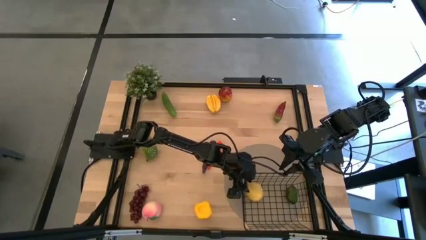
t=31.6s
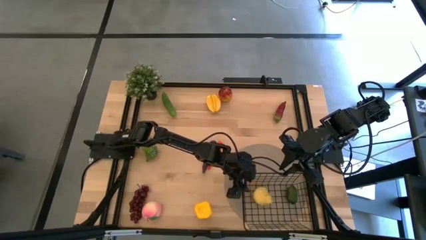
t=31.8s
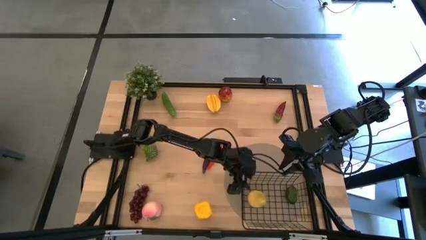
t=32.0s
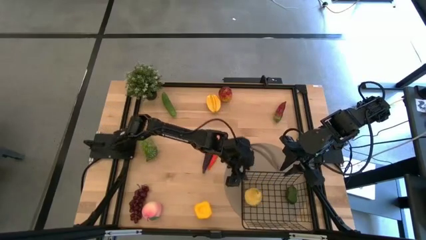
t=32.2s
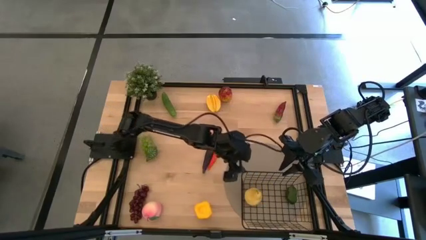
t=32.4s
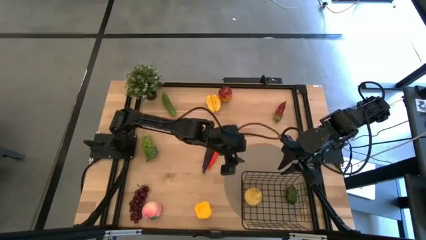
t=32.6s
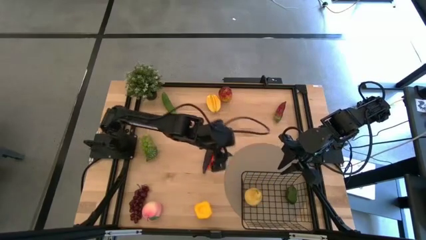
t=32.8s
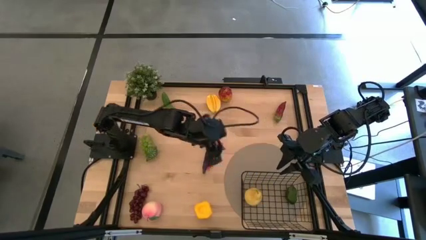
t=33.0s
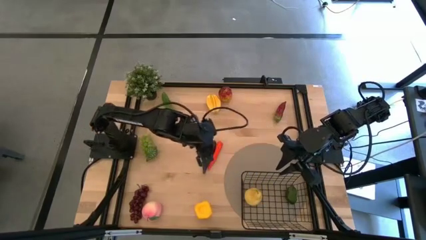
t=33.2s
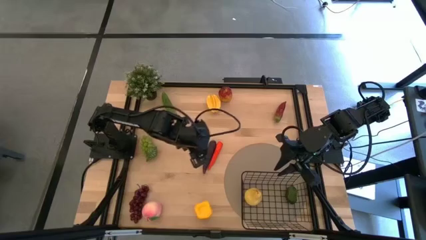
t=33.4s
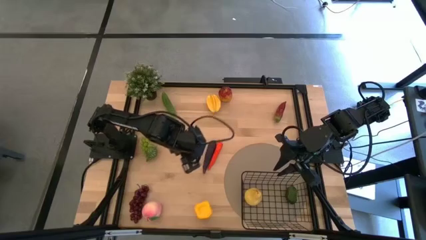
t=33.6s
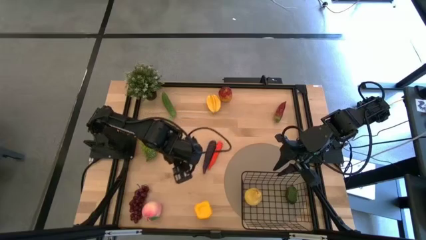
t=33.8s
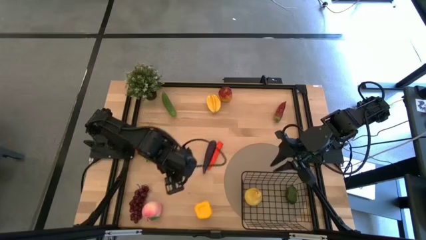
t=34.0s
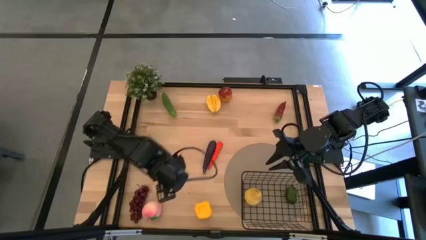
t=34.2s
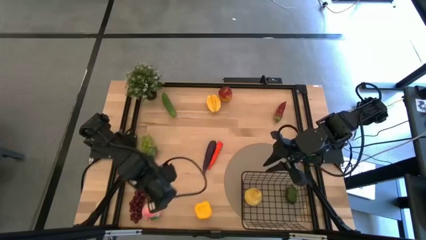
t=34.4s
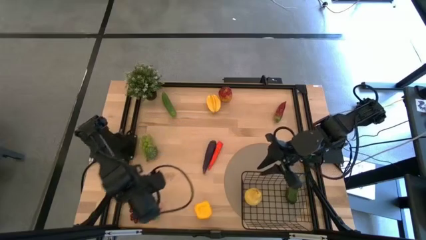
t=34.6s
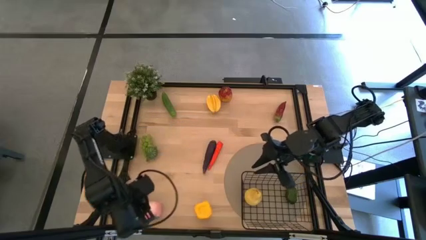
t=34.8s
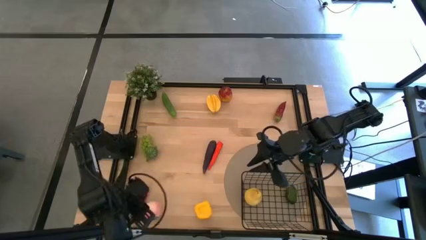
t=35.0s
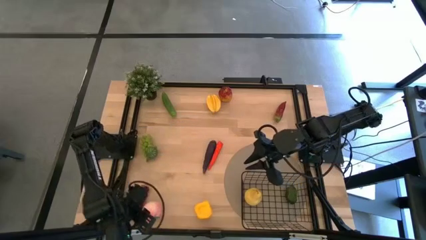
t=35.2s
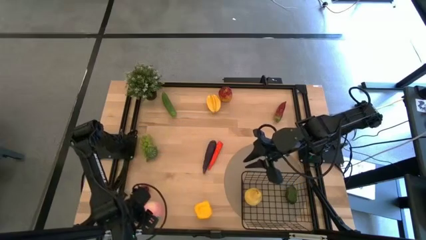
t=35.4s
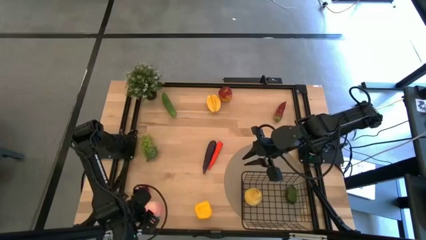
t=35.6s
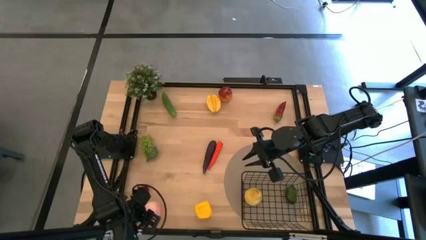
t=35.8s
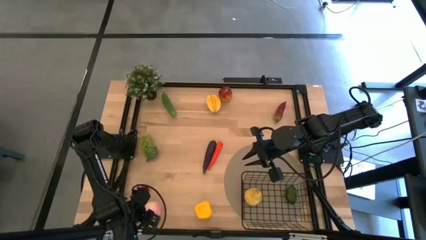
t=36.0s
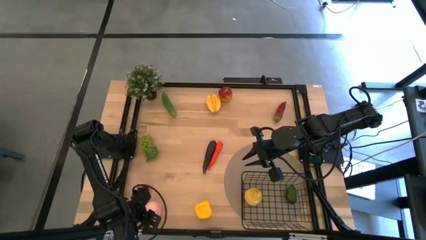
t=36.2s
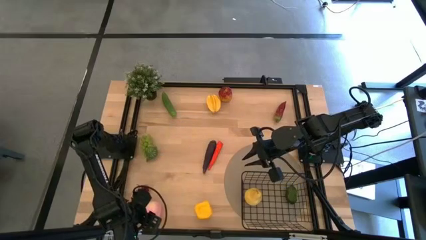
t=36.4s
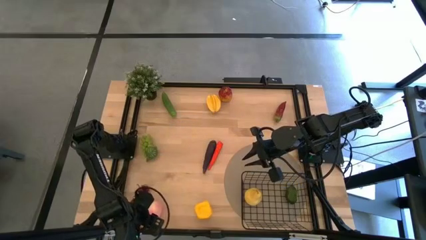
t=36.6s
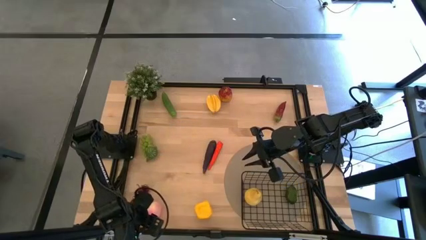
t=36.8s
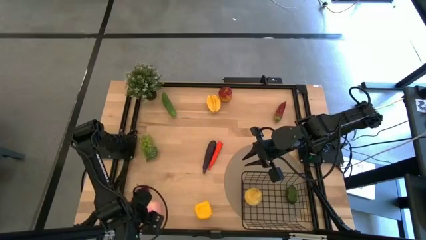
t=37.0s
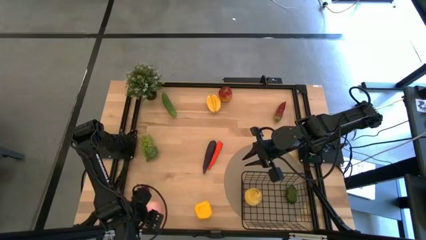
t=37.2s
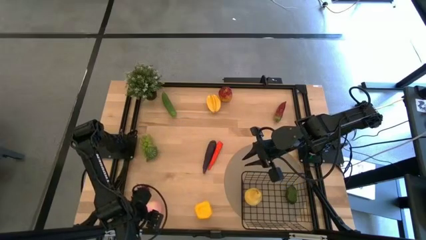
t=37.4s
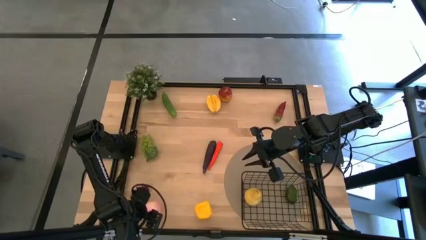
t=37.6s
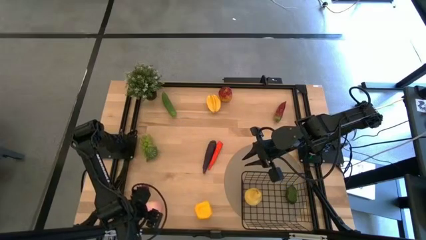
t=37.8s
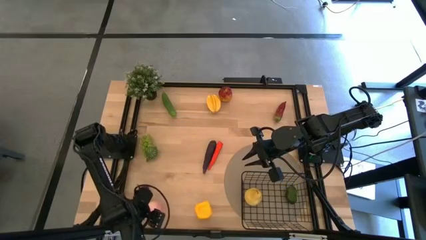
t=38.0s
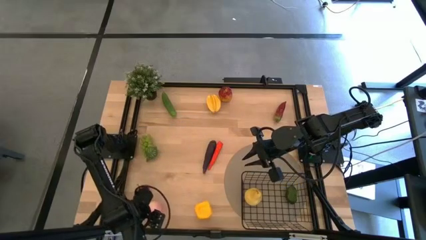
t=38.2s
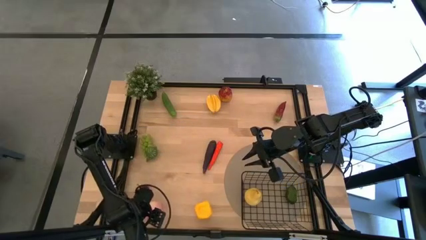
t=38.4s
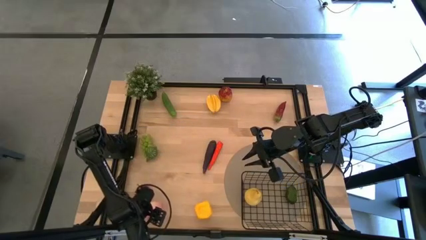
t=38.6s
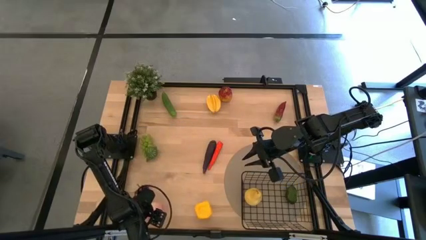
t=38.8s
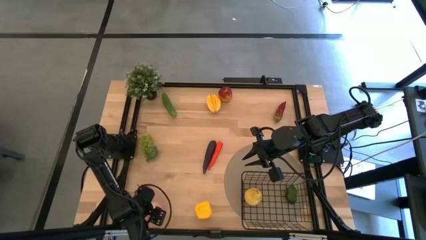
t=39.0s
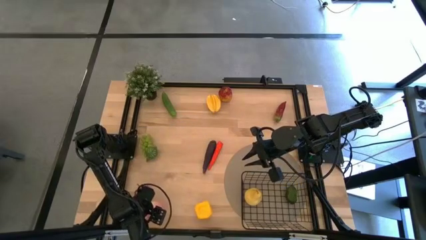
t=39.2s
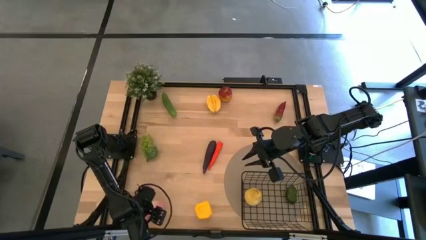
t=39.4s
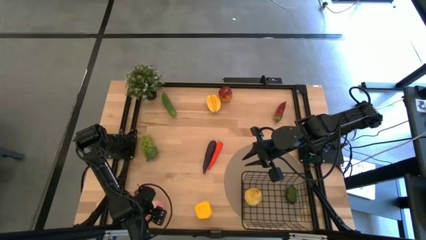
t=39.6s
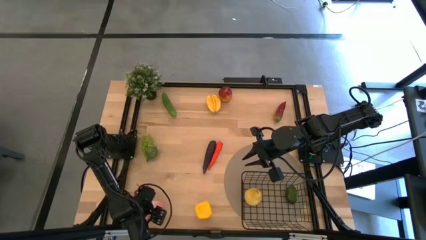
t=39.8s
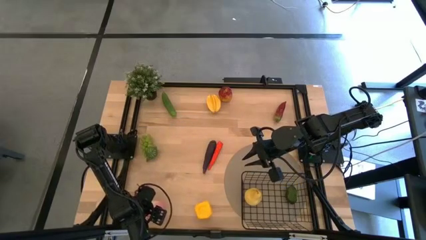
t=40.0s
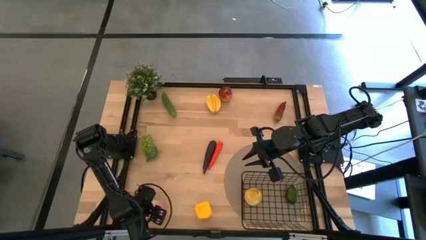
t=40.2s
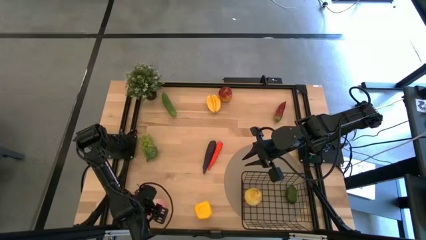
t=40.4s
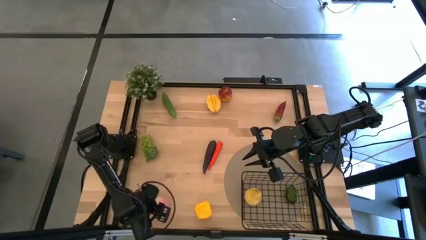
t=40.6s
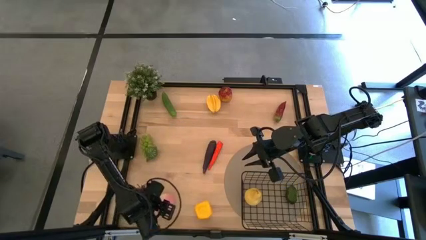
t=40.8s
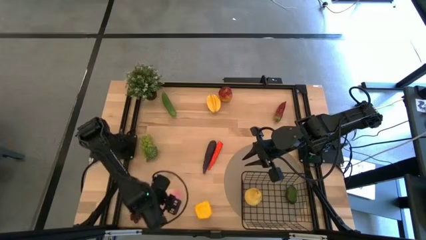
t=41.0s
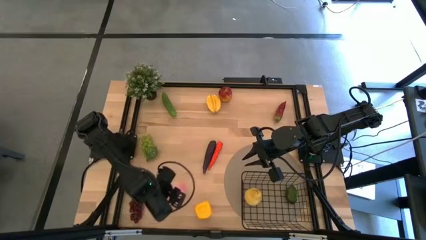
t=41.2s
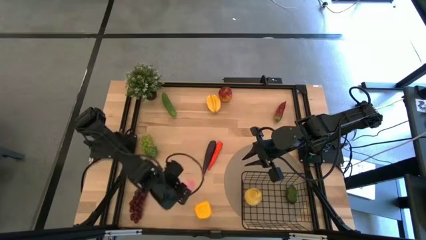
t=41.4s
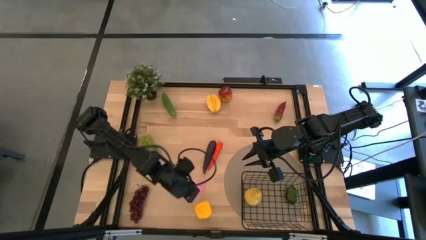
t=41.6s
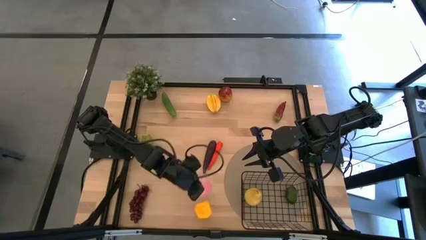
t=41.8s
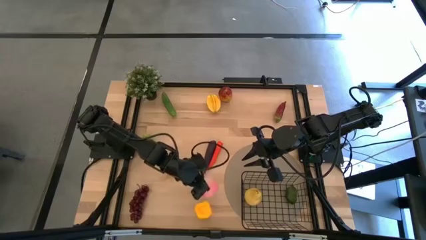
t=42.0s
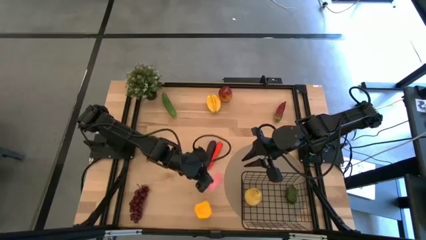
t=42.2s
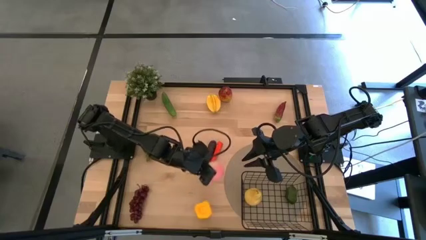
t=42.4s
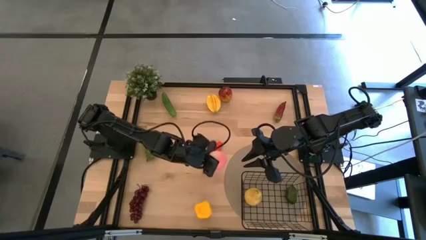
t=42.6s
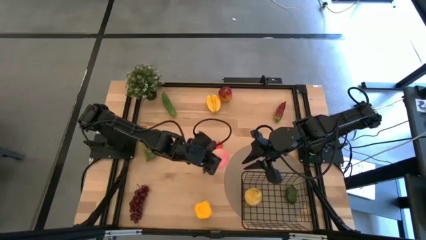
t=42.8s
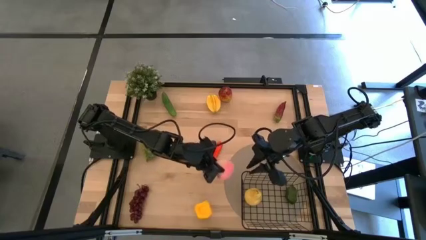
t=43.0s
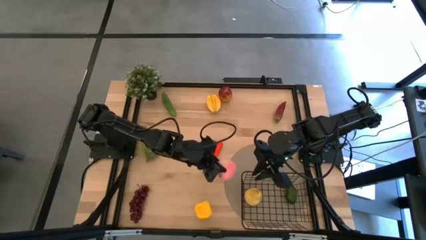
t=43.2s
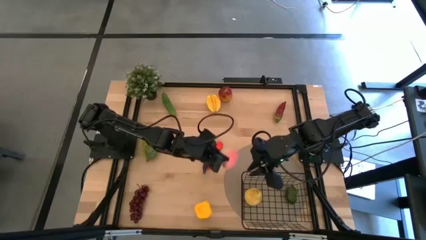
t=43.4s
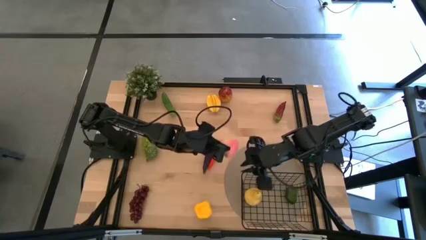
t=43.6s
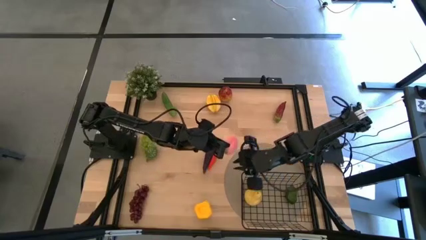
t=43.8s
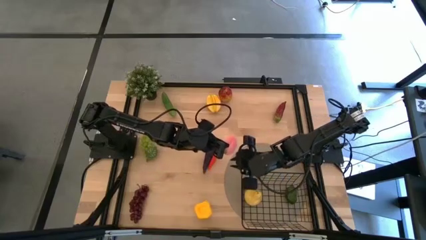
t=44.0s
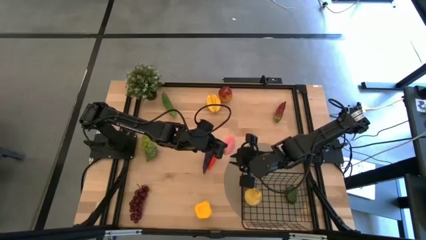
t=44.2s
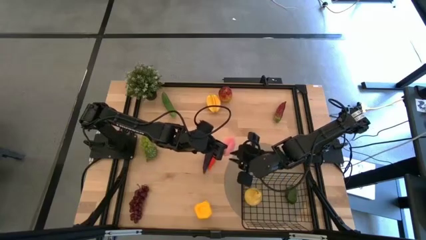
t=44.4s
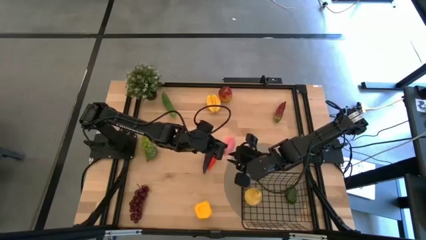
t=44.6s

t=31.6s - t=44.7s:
Task: Build produce basket
Put the pink peach into the wire basket

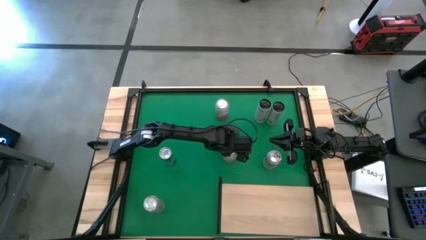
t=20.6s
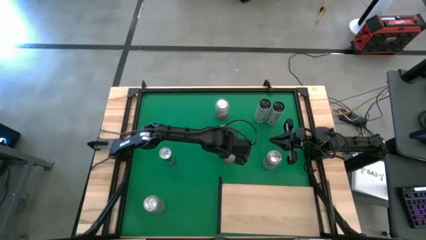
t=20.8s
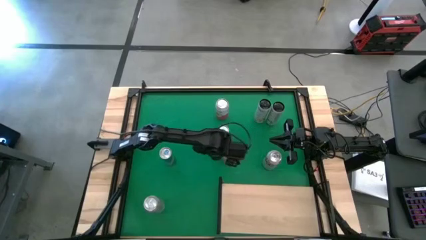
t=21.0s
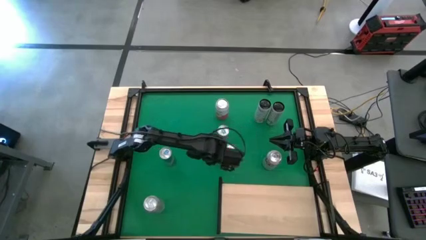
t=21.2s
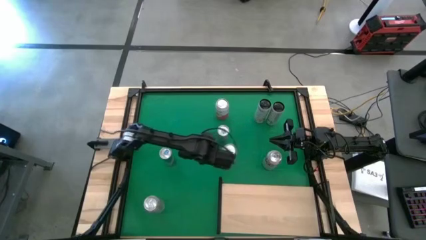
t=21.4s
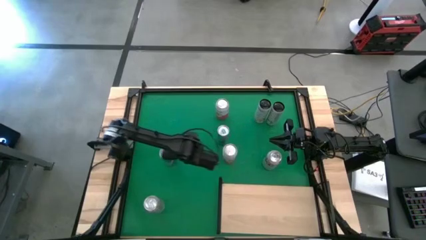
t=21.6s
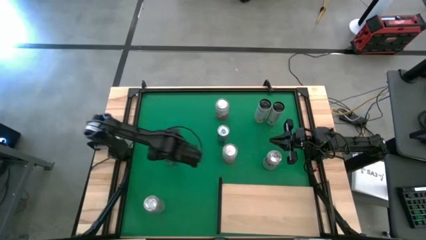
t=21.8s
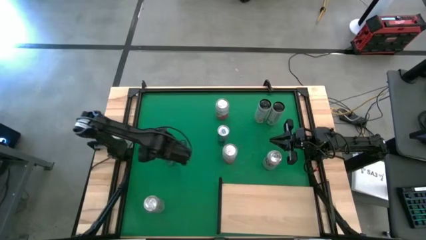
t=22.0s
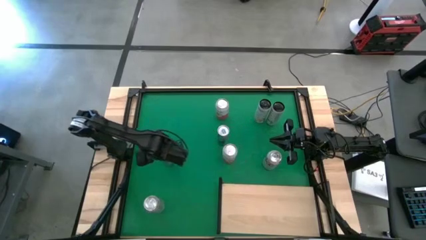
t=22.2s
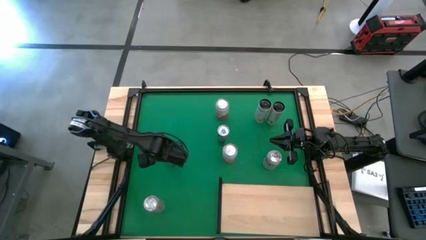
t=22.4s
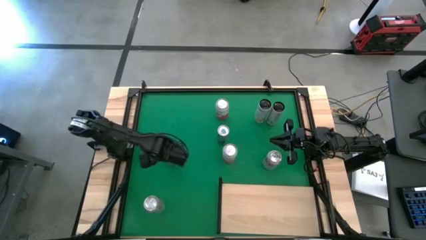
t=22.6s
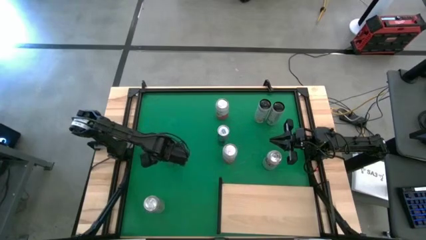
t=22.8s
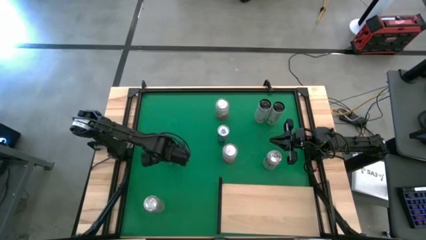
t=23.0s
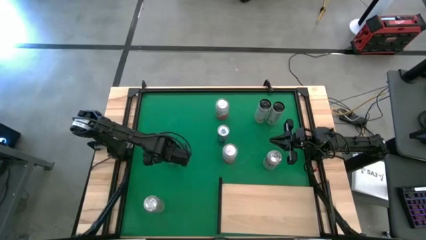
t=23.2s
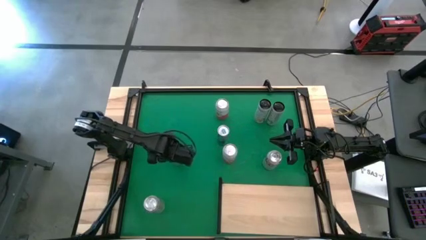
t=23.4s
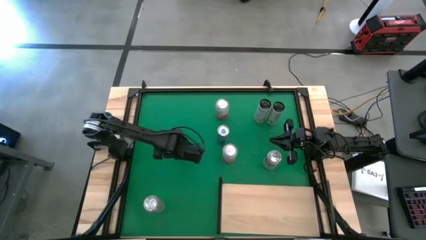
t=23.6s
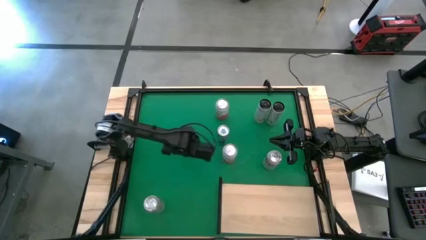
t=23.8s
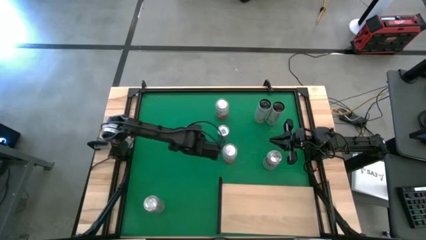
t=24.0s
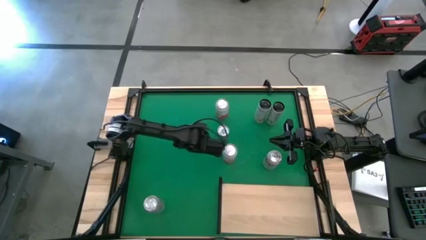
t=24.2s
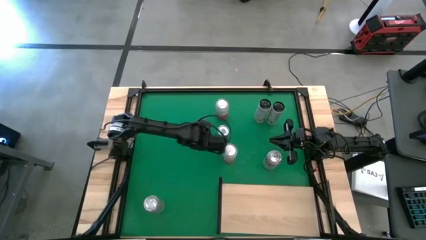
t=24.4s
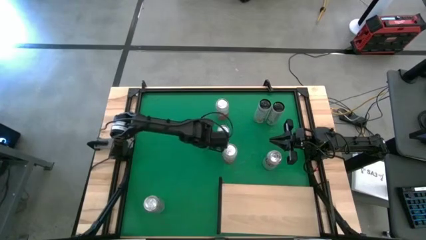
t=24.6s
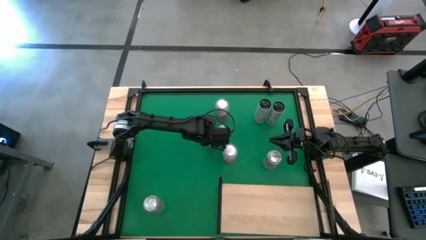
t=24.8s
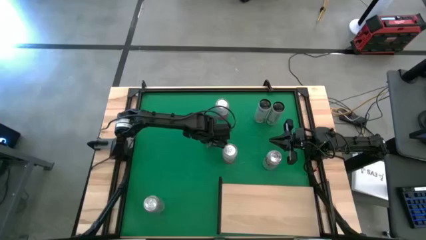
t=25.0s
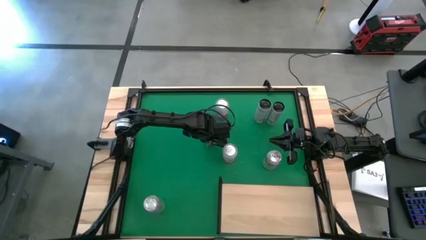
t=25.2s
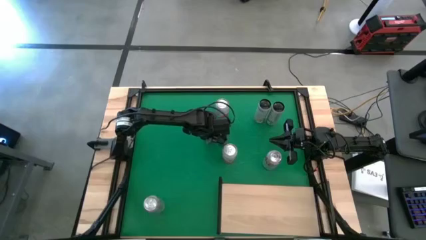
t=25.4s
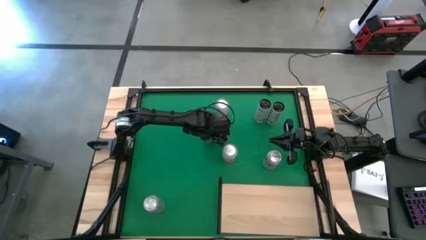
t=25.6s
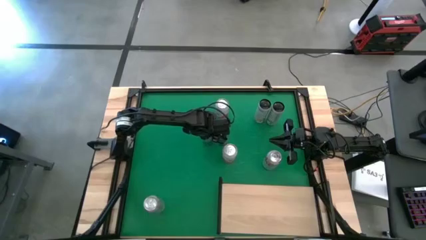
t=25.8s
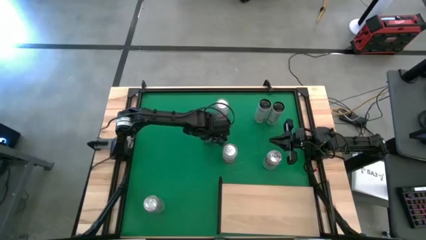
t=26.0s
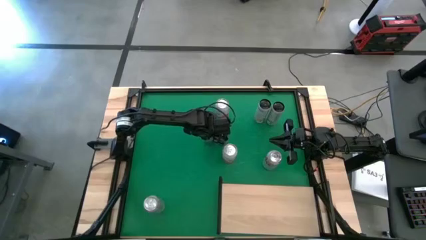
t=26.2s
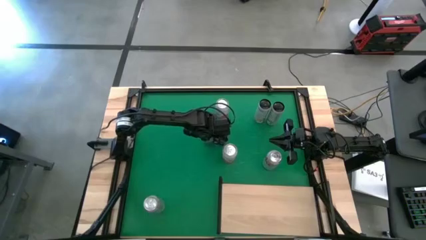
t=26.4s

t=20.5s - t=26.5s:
Task: Place canned beverage on shelf
Move the left blue soda can to the center of the table
